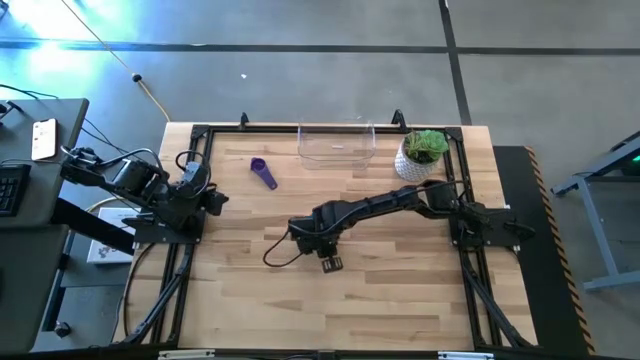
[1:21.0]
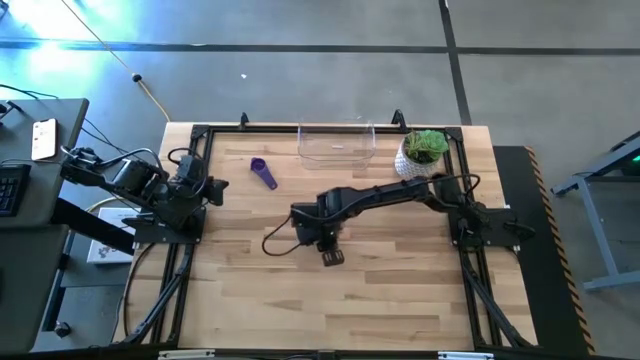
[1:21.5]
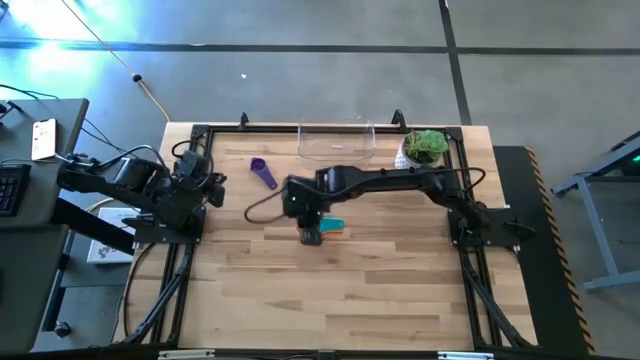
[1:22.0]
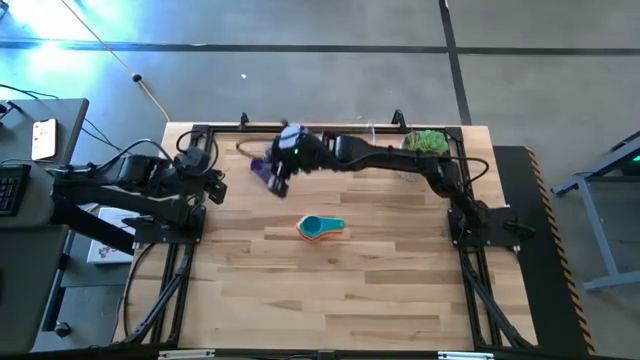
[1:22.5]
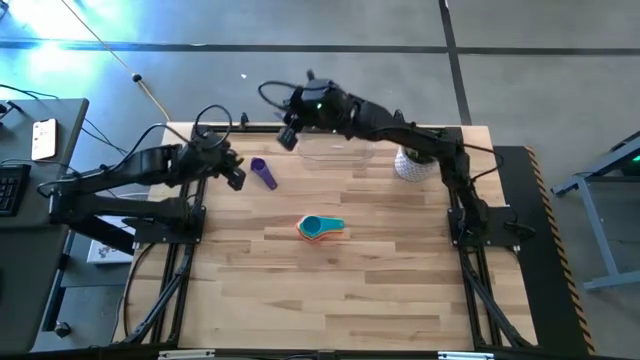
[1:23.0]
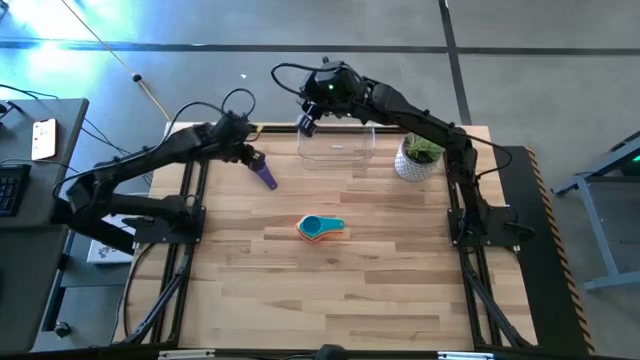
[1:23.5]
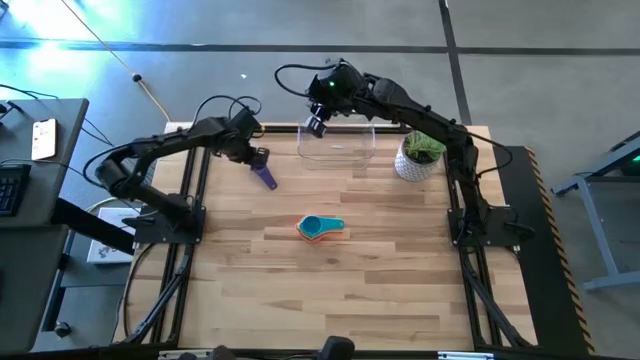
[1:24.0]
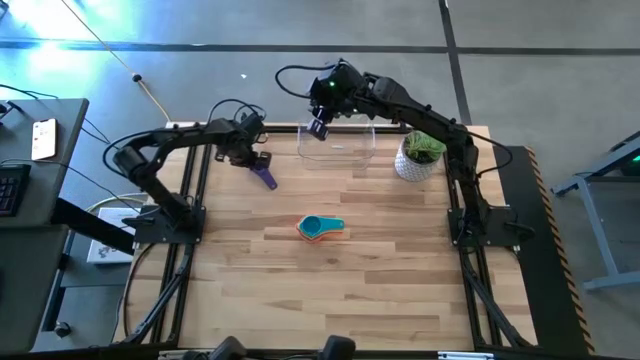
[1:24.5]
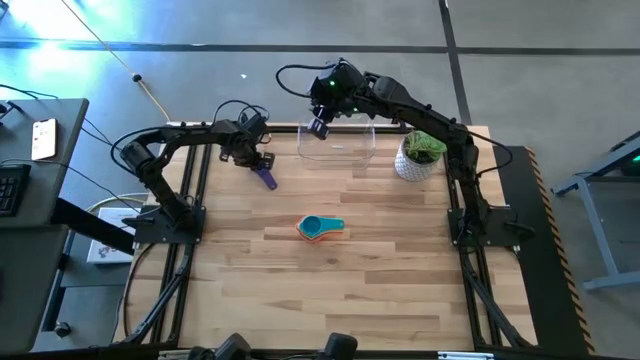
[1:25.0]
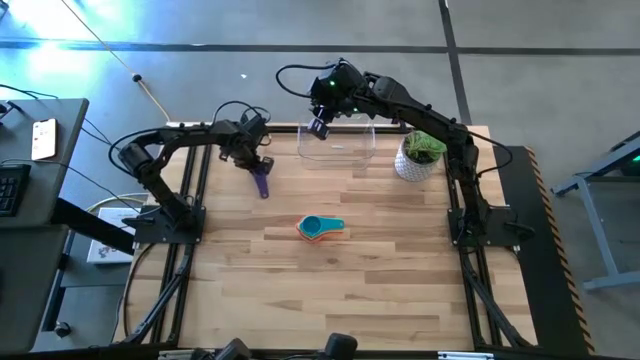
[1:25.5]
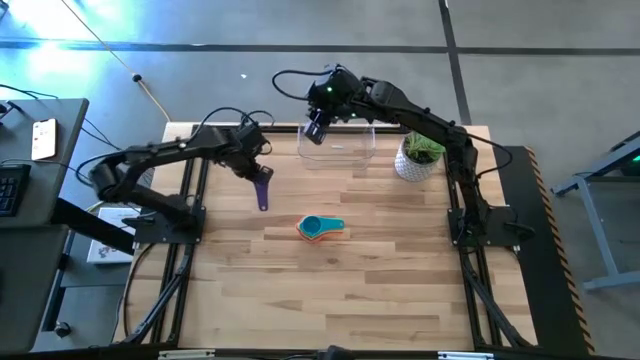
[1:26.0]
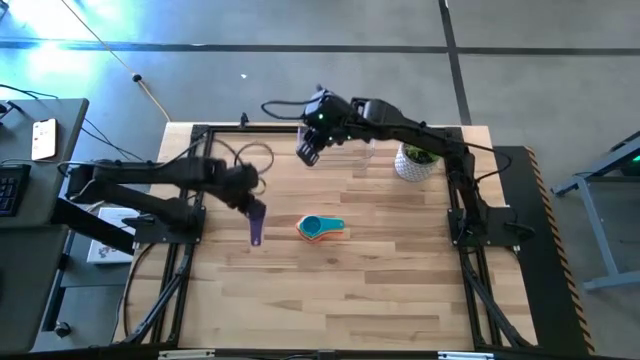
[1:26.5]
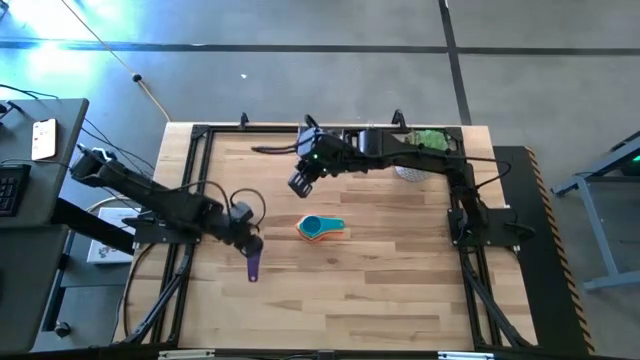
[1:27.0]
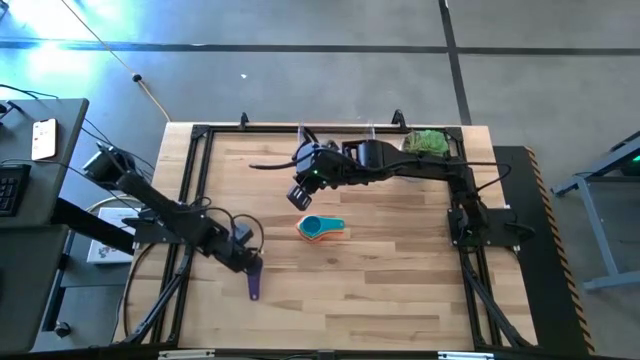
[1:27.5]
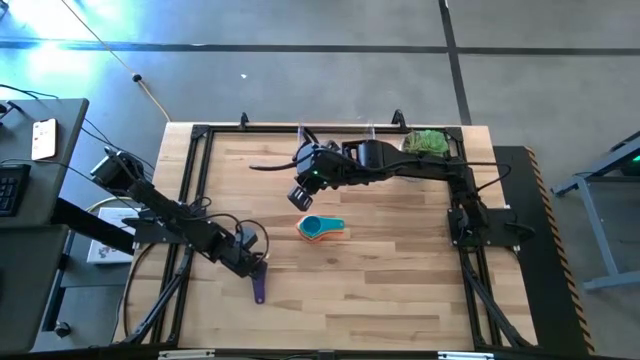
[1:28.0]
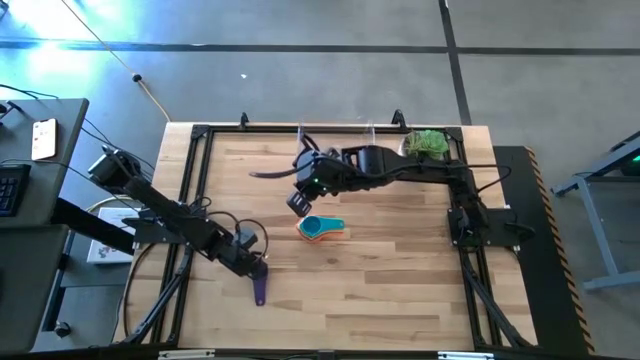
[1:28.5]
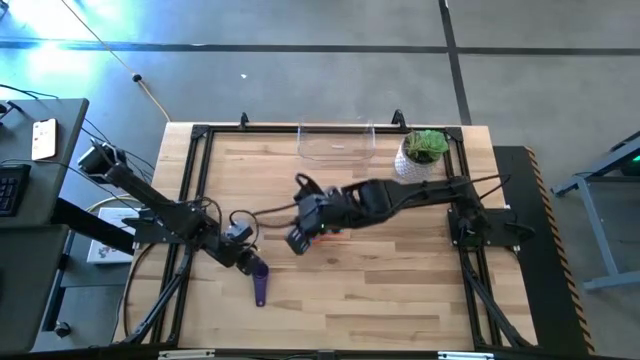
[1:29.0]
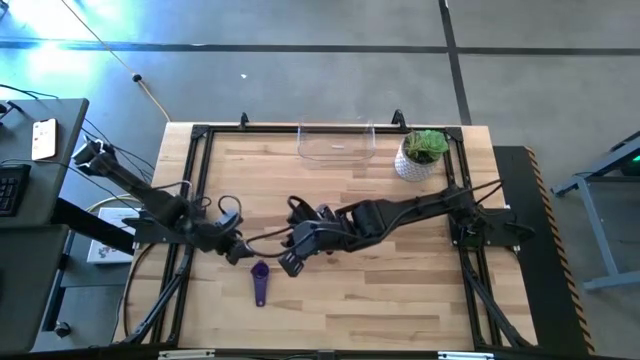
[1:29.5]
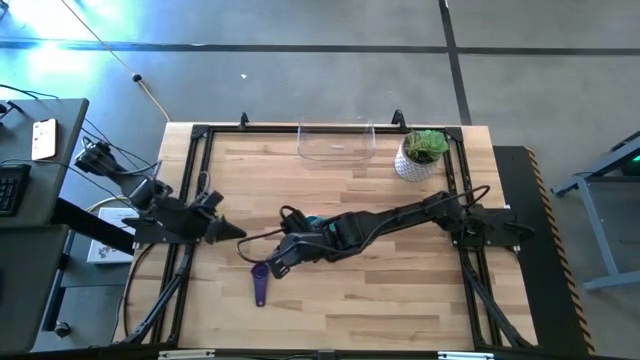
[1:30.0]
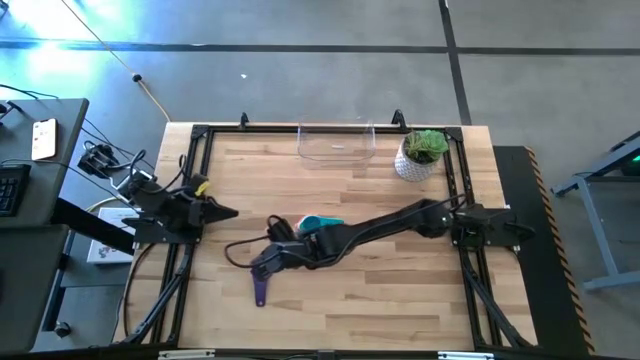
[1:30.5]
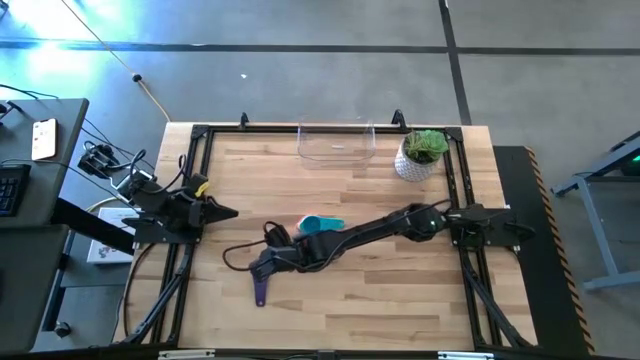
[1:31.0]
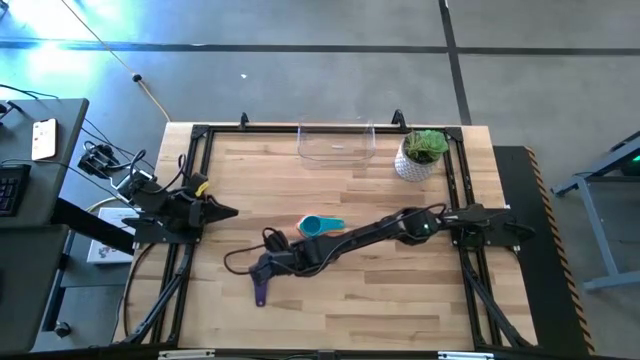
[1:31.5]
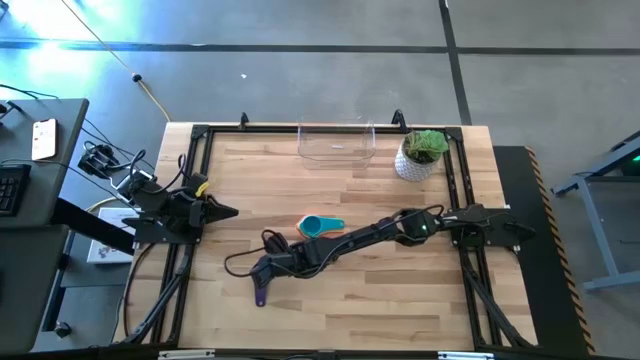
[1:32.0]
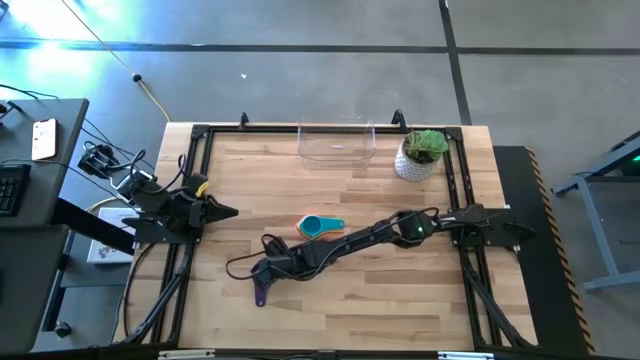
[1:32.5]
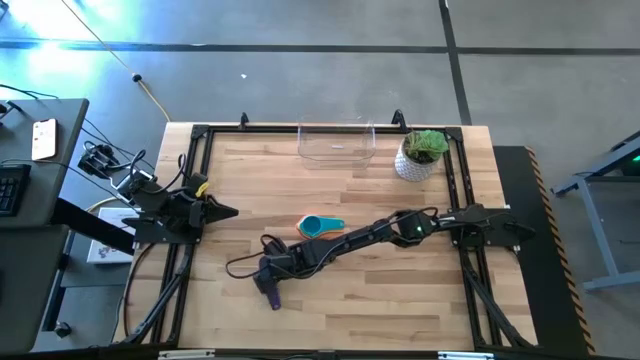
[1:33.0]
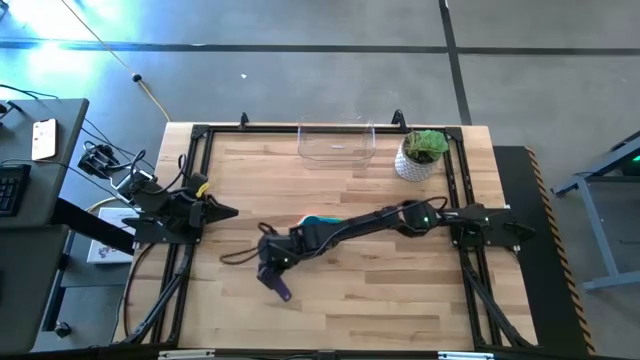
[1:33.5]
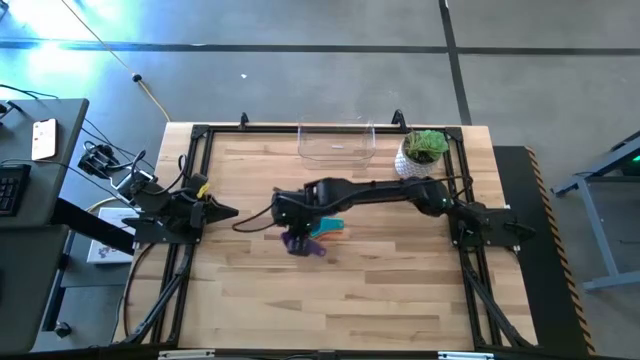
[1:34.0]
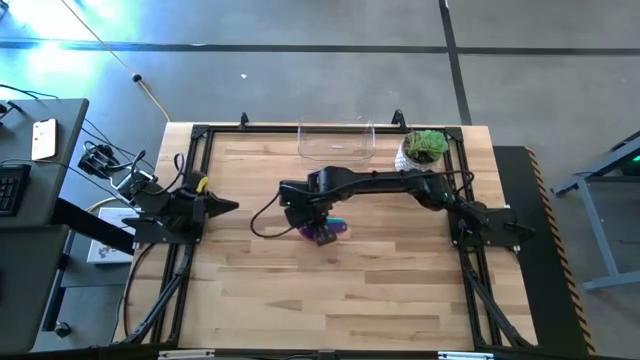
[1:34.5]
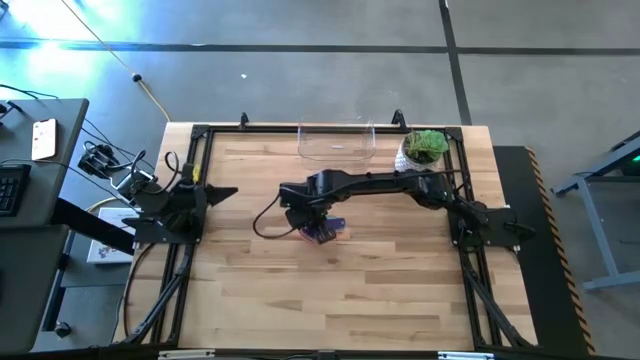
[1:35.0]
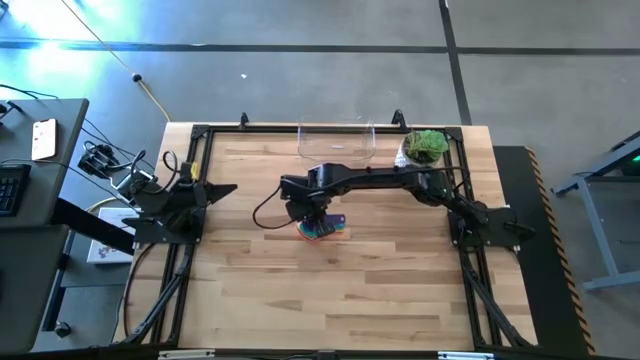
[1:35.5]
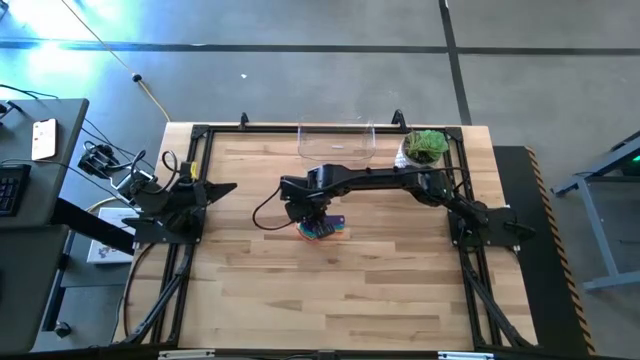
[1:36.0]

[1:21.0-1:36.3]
Task: Nest measuring cups in basket
Stack the dark blue measuring cup on top of the light blue measuring cup
